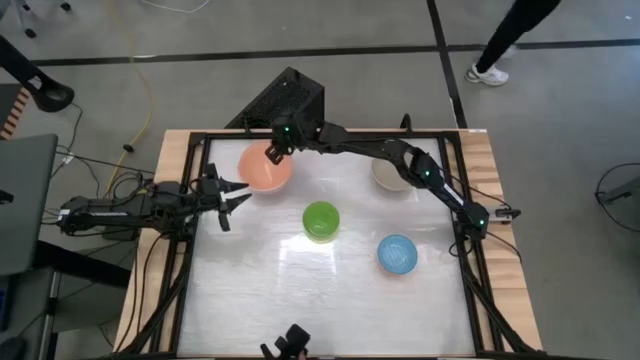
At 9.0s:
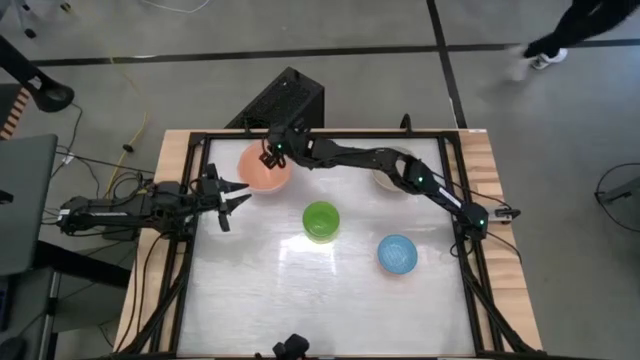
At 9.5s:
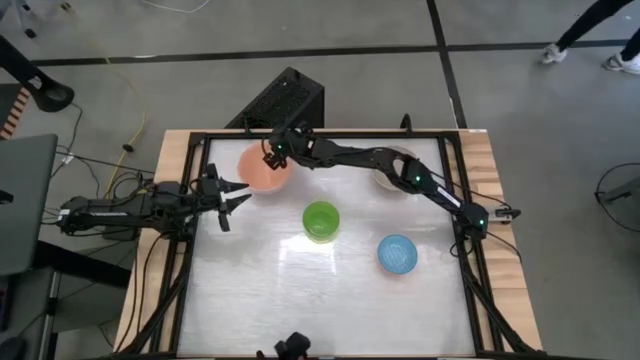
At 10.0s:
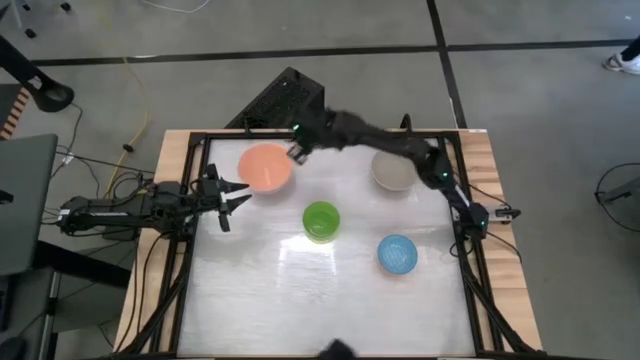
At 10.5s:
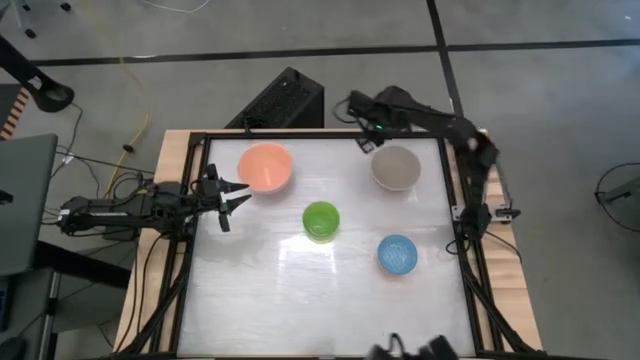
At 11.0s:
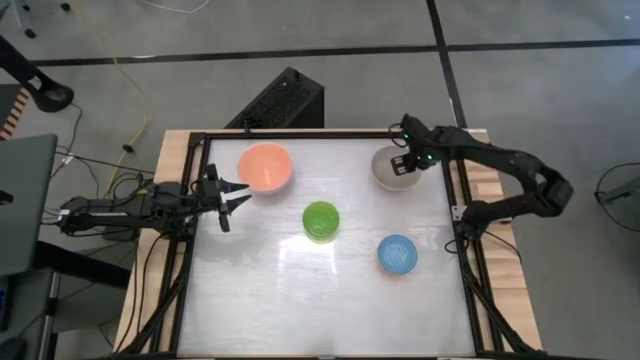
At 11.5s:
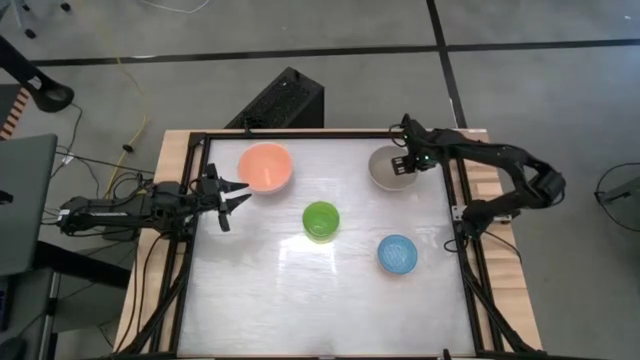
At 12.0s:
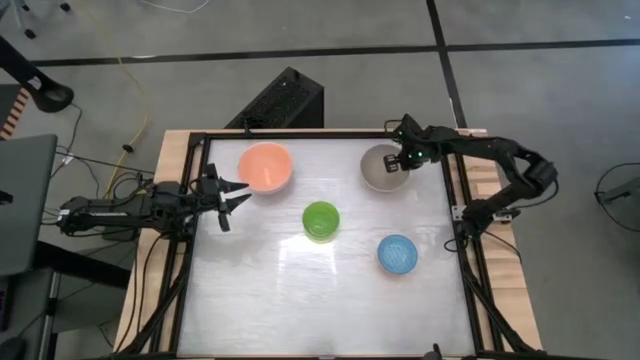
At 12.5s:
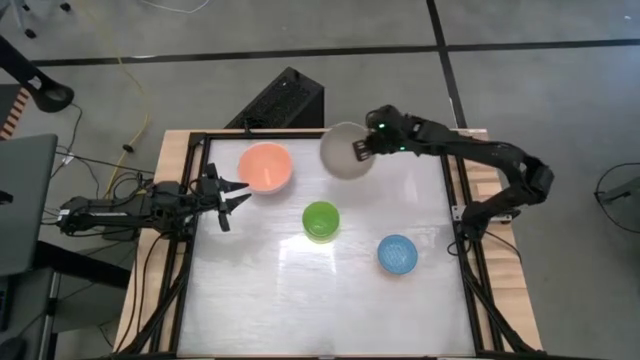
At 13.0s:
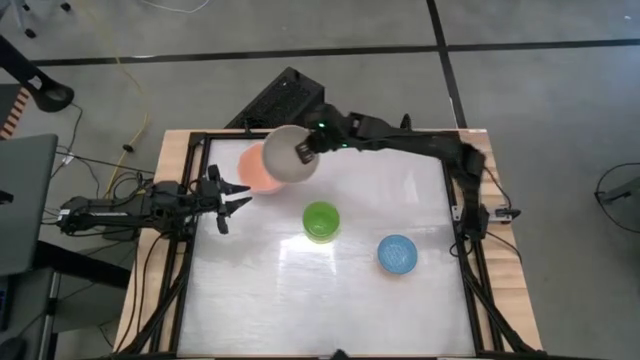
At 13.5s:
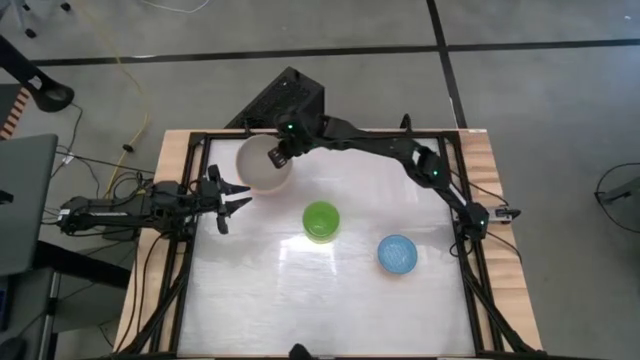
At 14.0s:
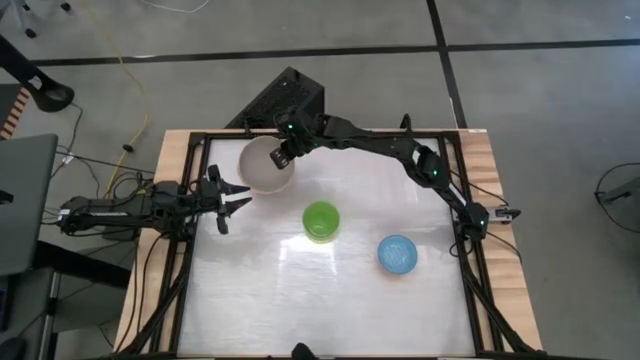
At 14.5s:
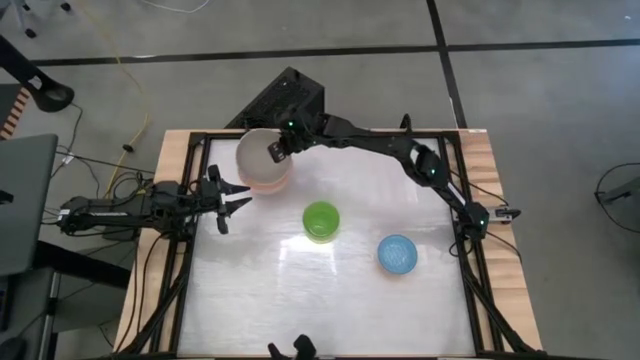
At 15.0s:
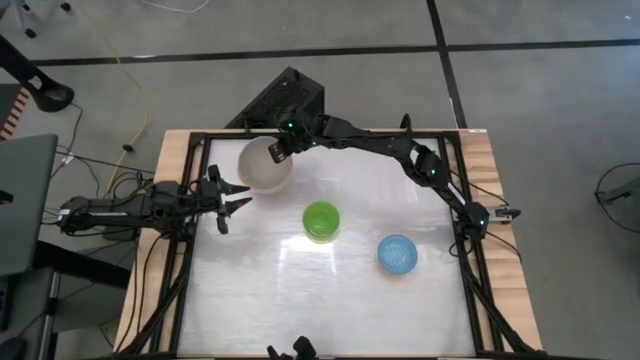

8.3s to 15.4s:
Stack the gray bowl on top of the orange bowl

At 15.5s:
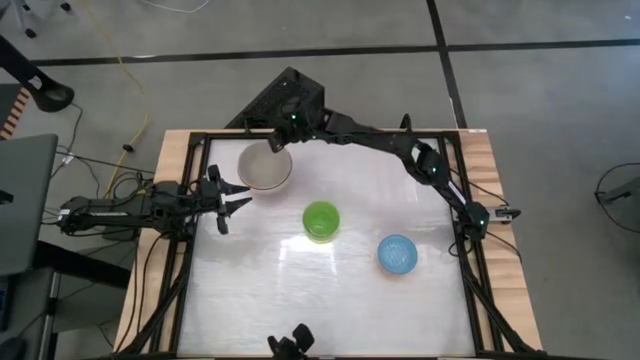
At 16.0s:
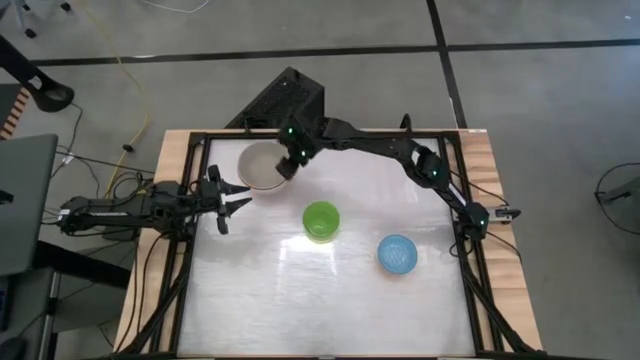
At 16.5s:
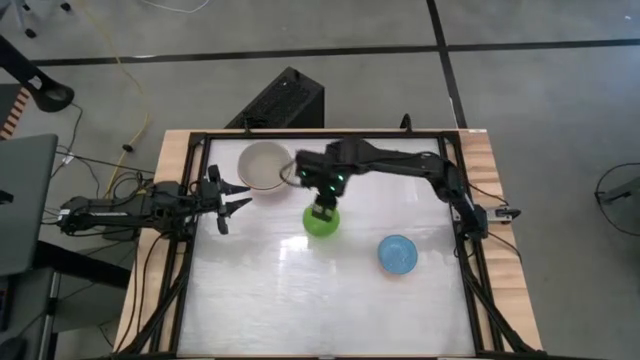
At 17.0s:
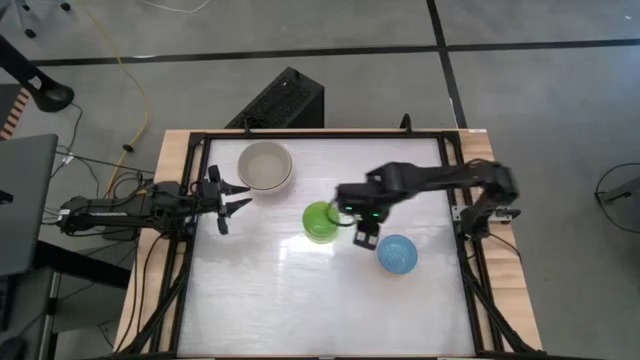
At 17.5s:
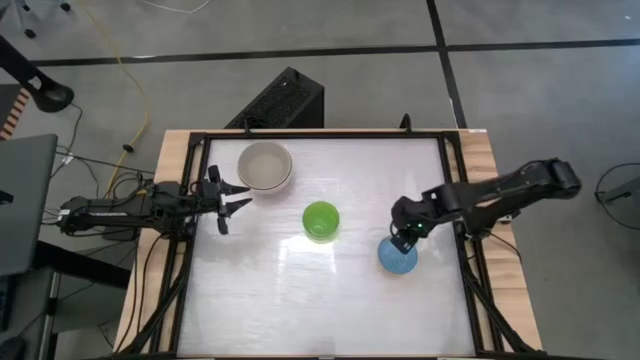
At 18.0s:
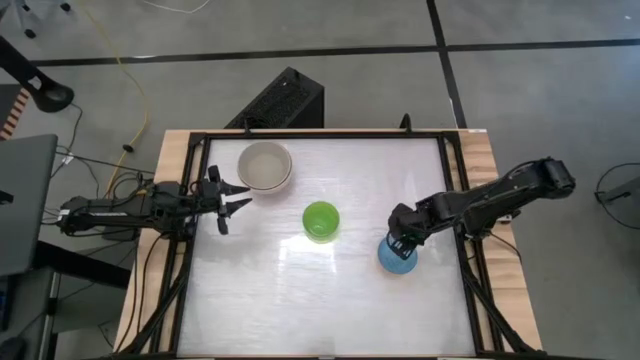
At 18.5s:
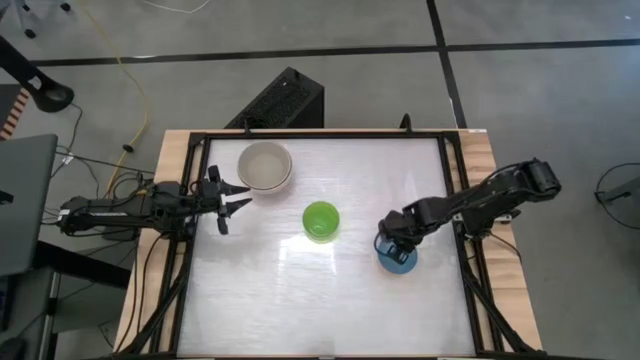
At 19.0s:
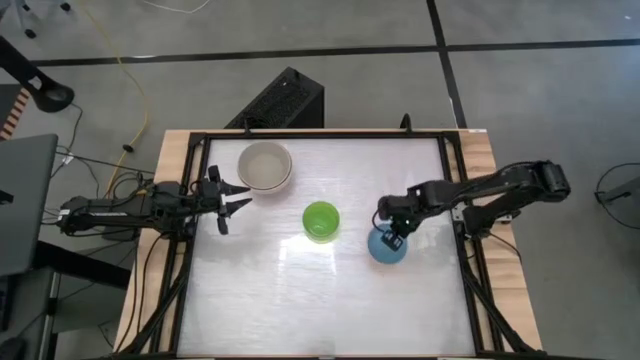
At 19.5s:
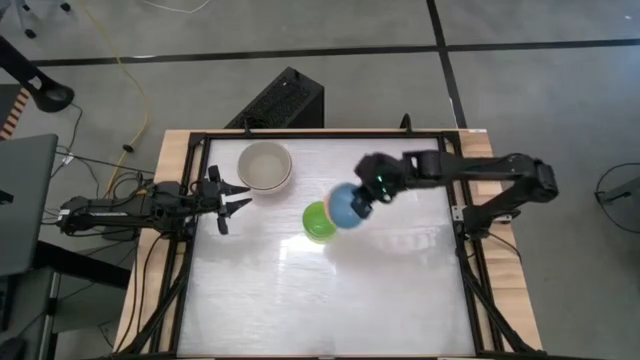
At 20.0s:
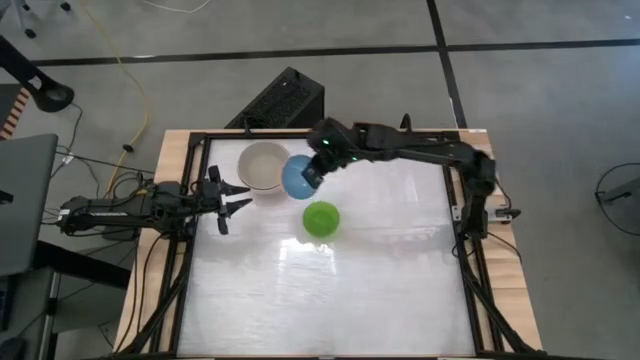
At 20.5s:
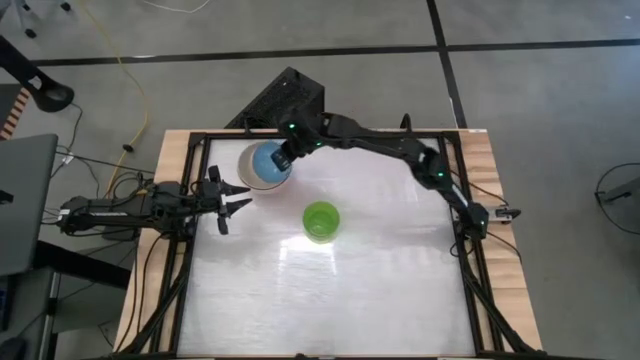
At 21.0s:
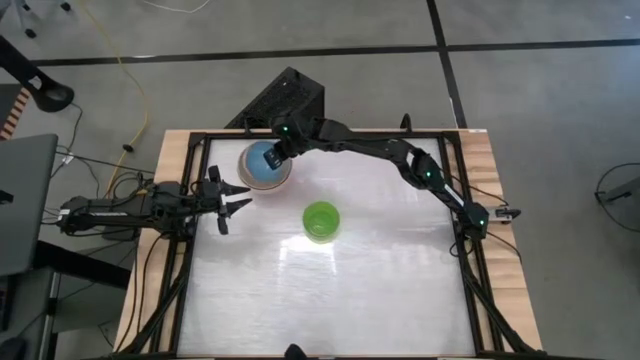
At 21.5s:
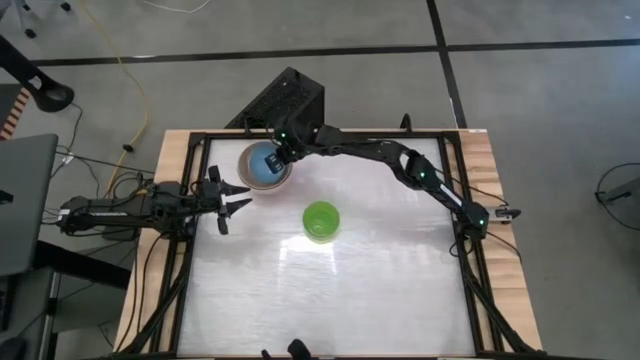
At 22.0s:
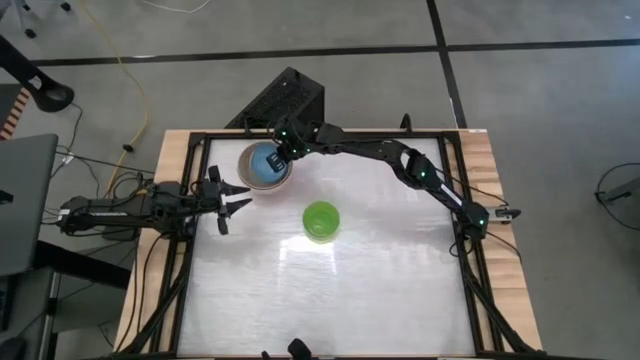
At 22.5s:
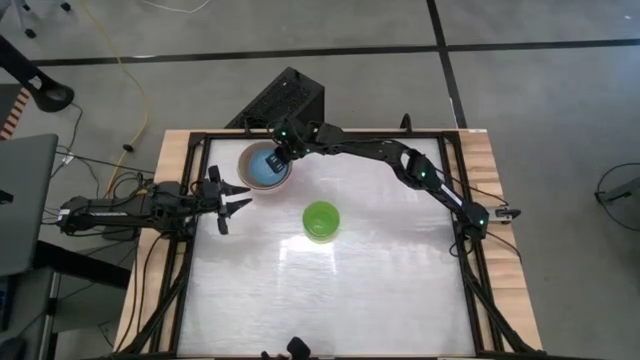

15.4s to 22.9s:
Stack the blue bowl on top of the gray bowl

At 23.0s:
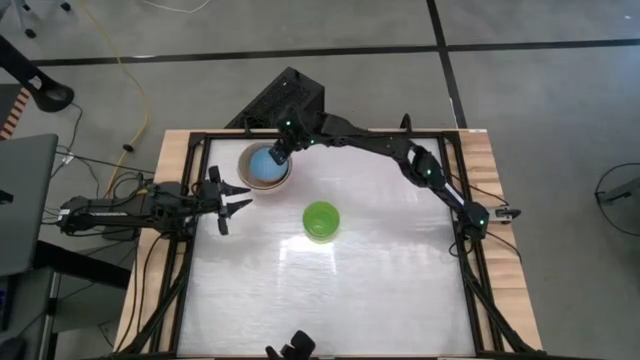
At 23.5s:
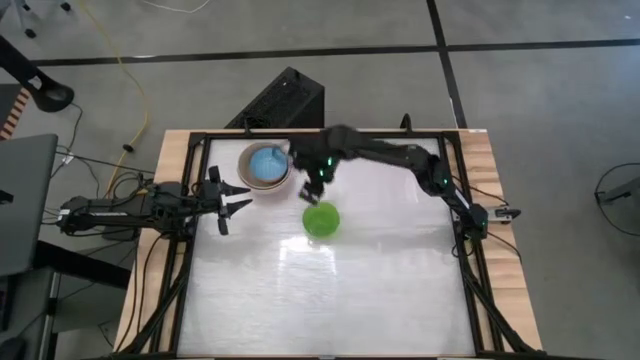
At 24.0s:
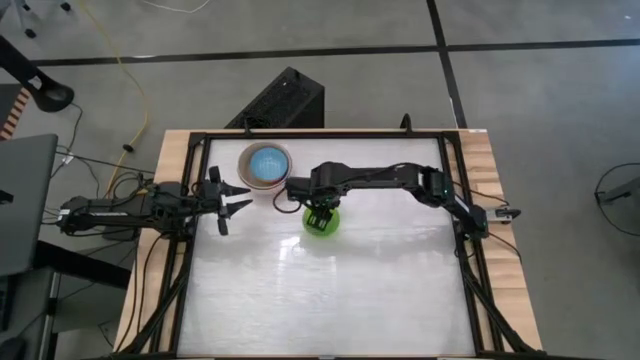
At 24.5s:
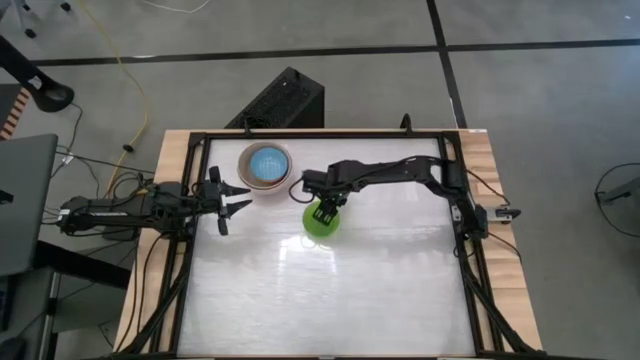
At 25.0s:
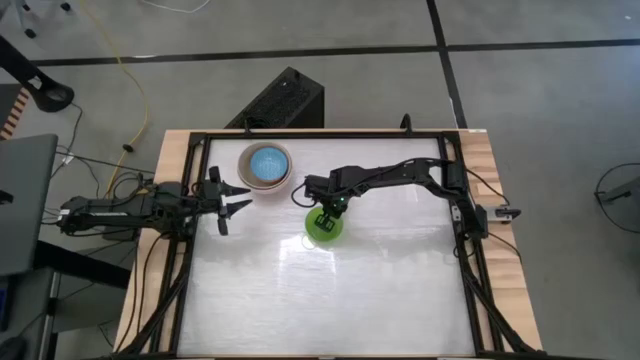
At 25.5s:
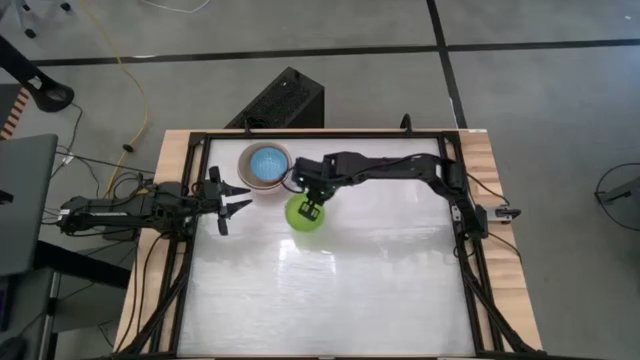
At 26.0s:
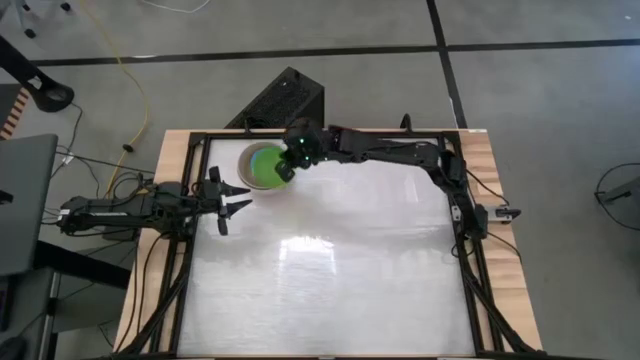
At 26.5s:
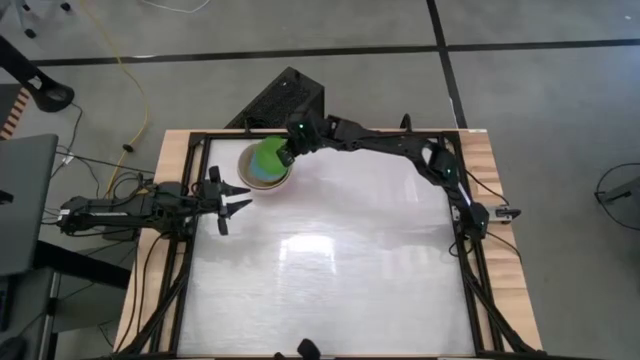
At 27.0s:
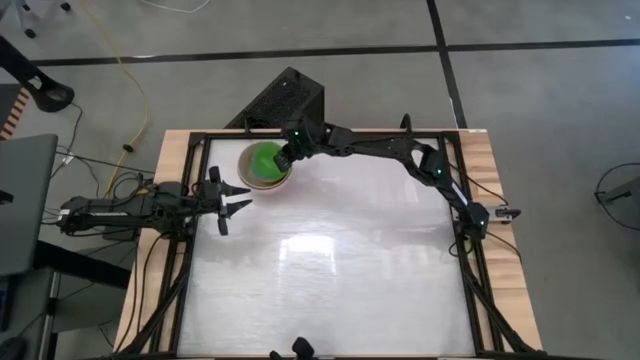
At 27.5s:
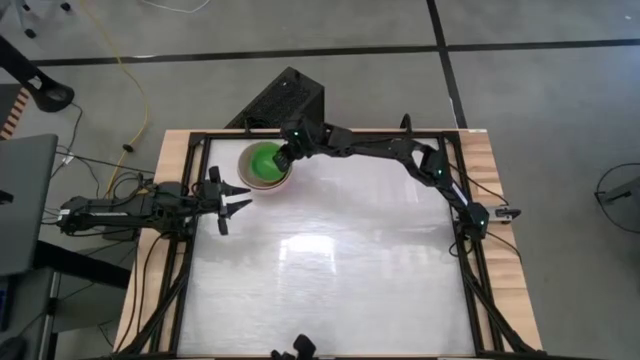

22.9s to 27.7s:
Stack the green bowl on top of the blue bowl

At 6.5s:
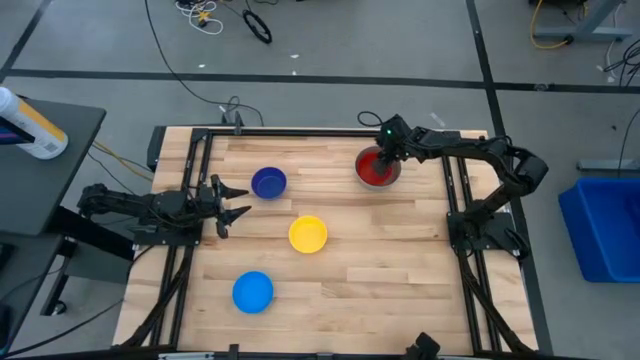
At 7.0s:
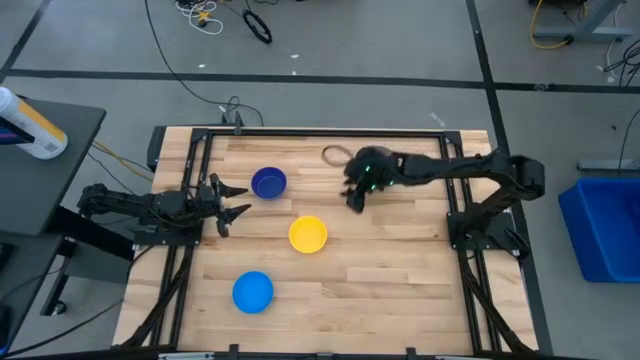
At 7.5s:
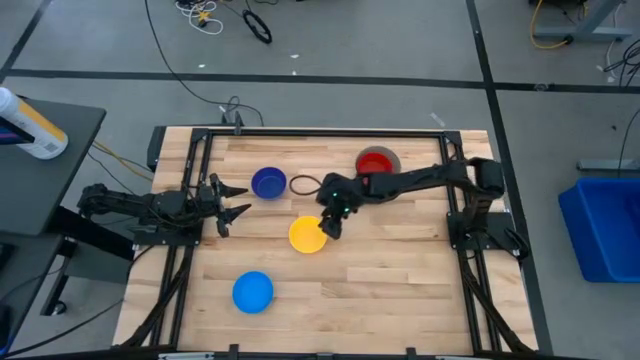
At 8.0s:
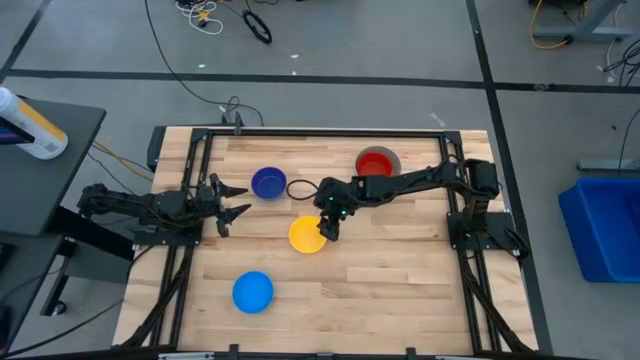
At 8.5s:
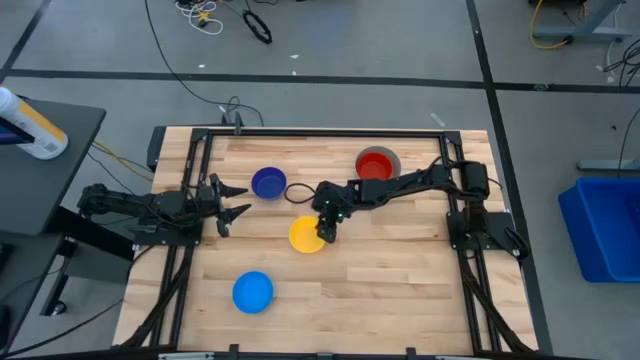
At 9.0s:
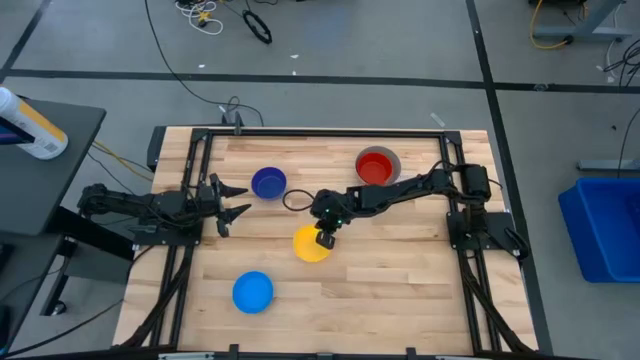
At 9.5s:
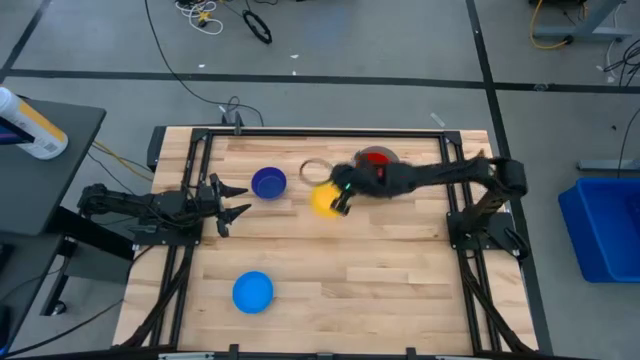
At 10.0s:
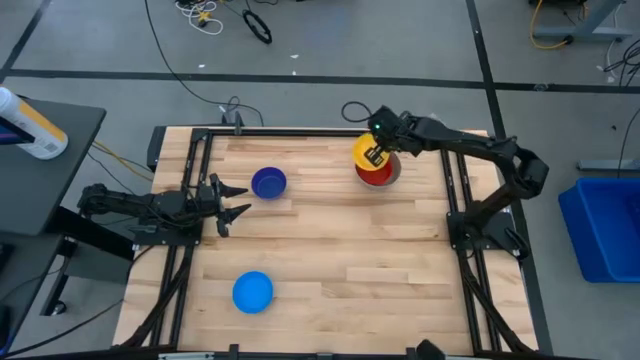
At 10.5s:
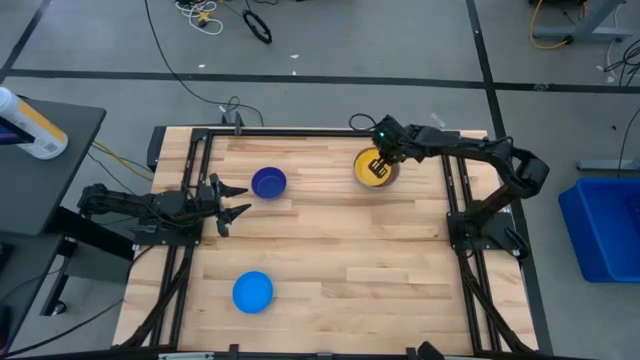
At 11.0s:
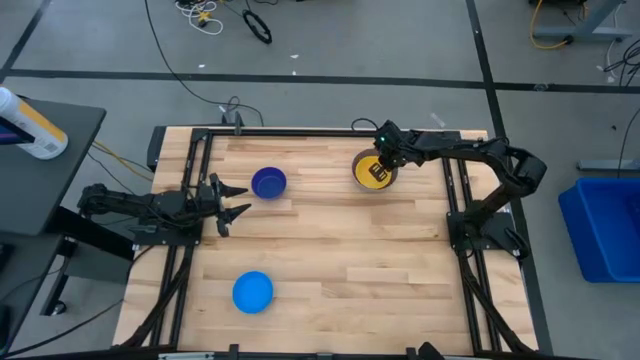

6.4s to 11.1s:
Stack the yellow bowl on the orange bowl
